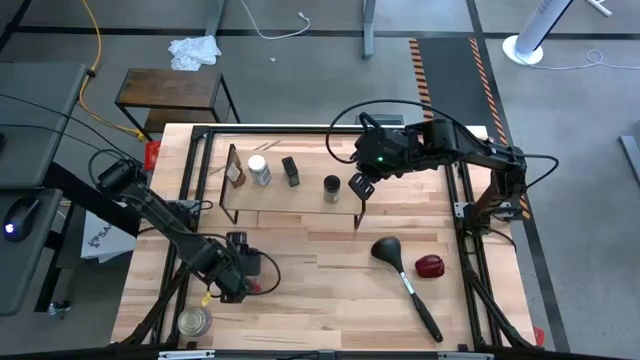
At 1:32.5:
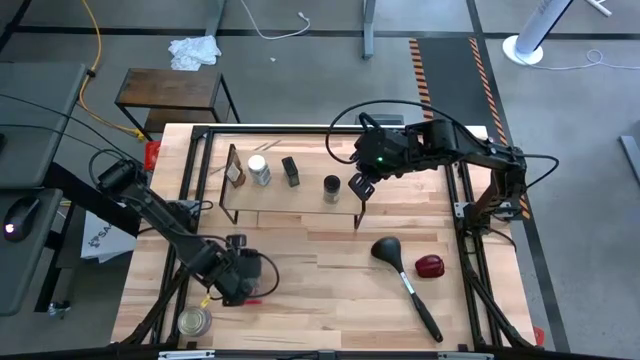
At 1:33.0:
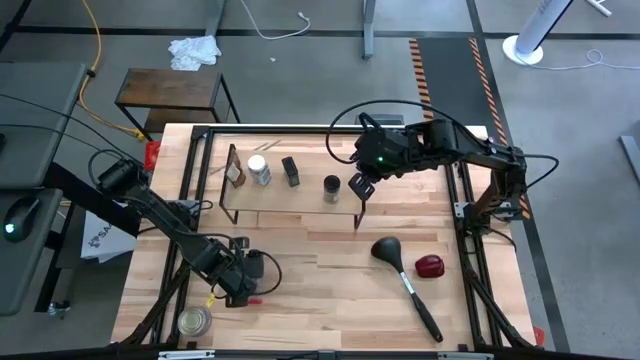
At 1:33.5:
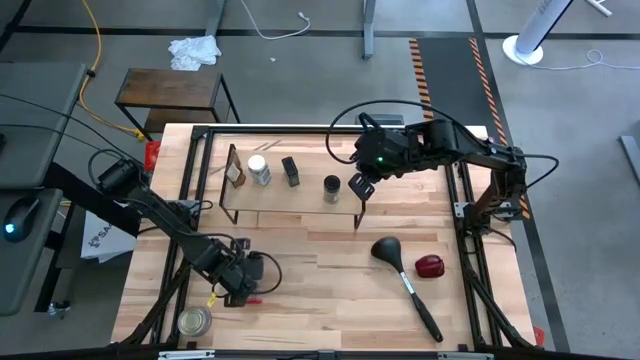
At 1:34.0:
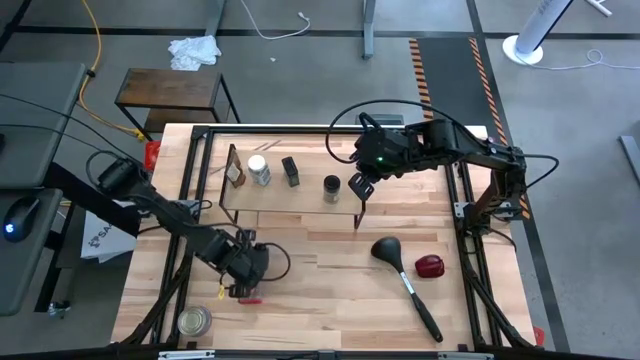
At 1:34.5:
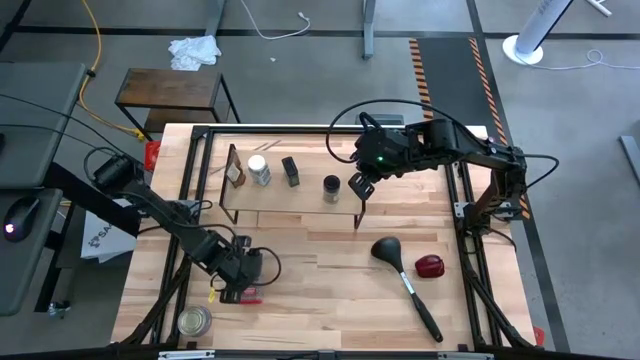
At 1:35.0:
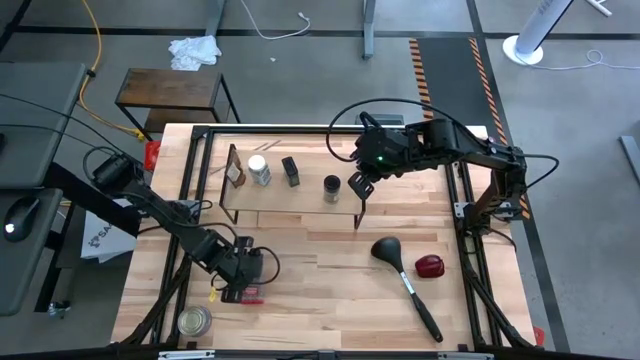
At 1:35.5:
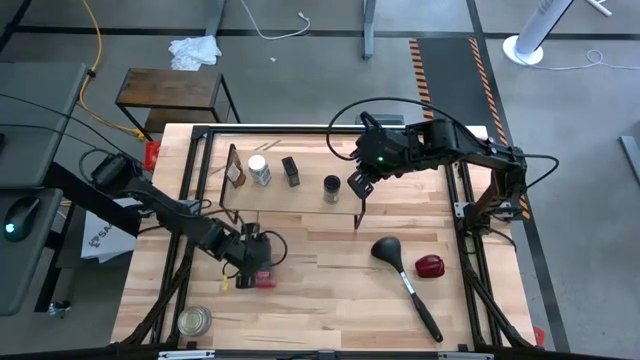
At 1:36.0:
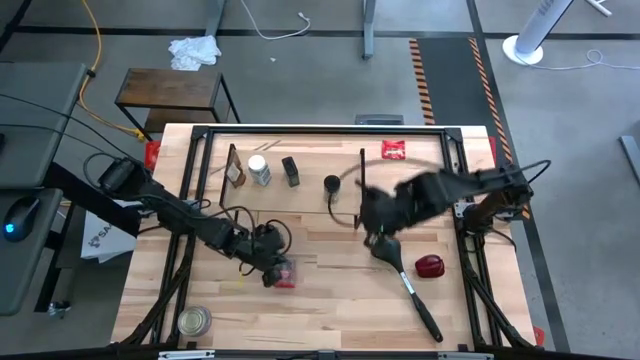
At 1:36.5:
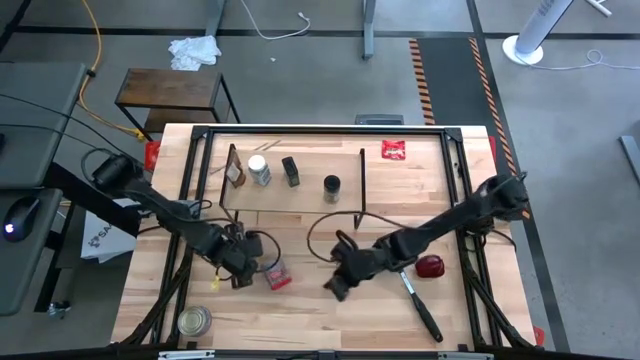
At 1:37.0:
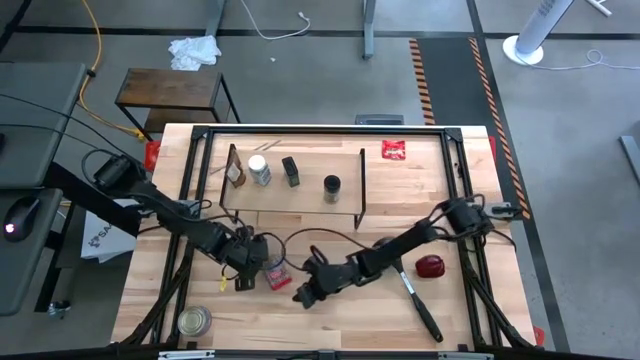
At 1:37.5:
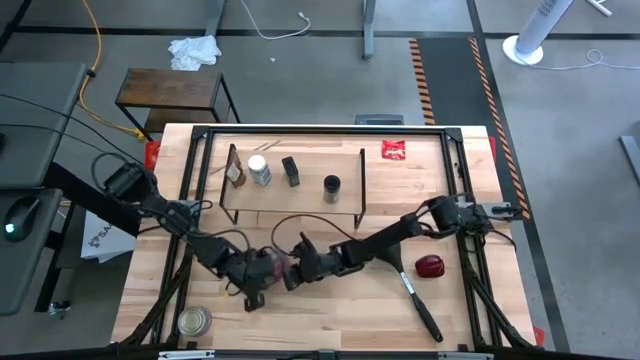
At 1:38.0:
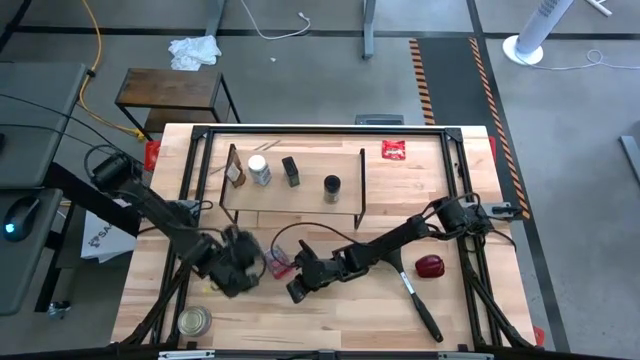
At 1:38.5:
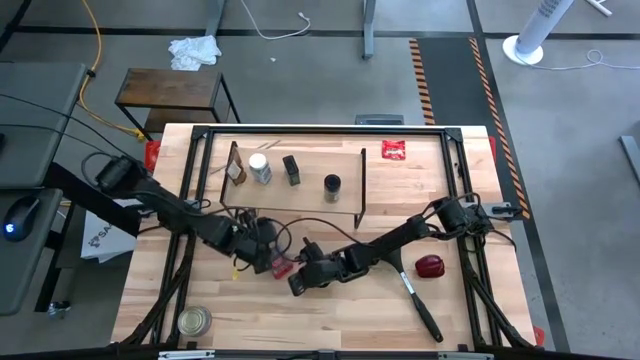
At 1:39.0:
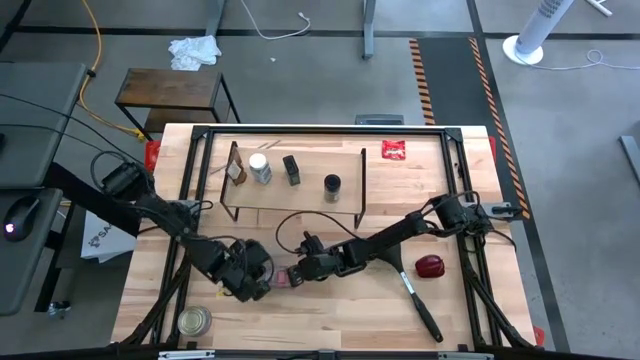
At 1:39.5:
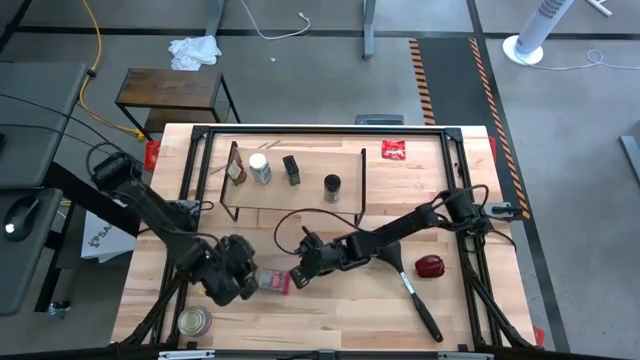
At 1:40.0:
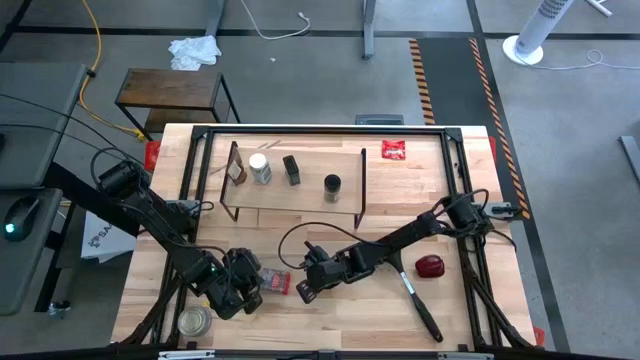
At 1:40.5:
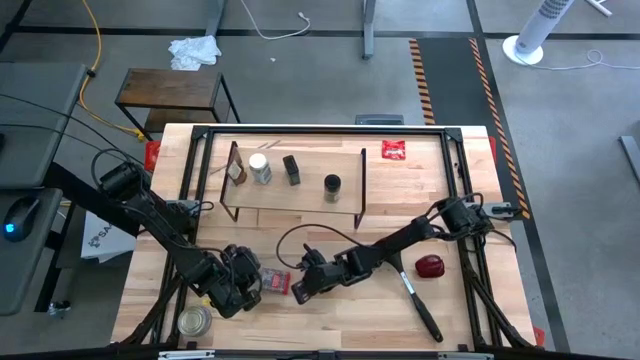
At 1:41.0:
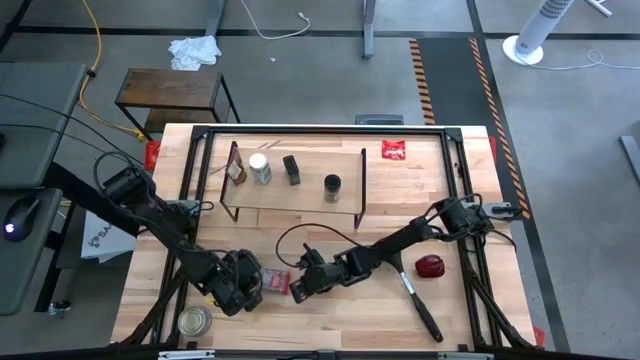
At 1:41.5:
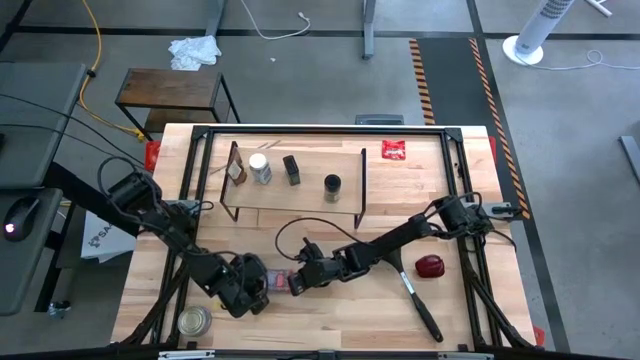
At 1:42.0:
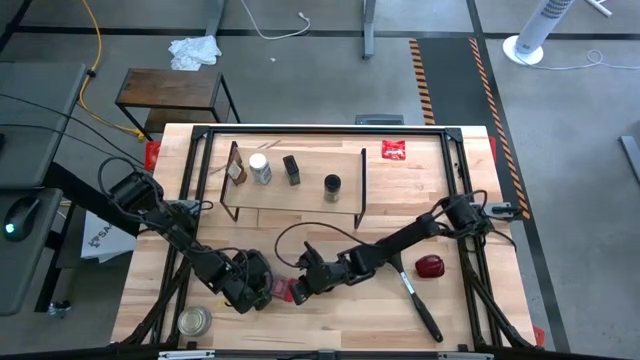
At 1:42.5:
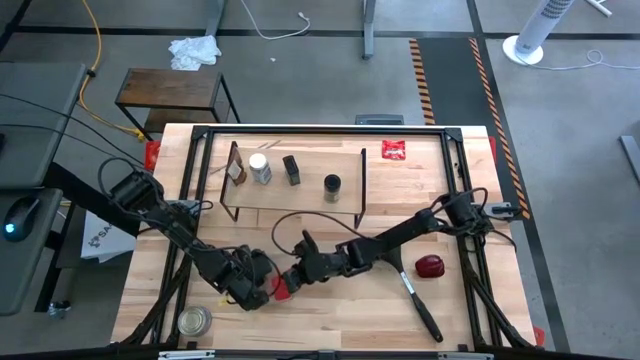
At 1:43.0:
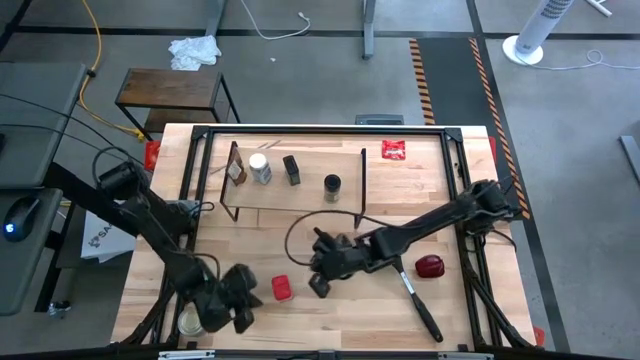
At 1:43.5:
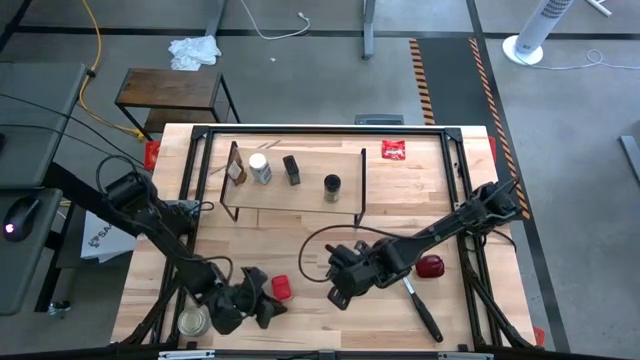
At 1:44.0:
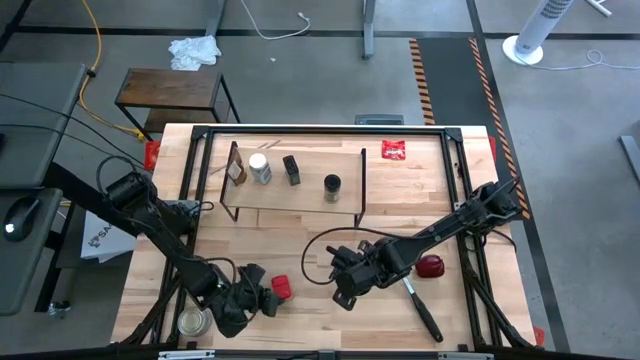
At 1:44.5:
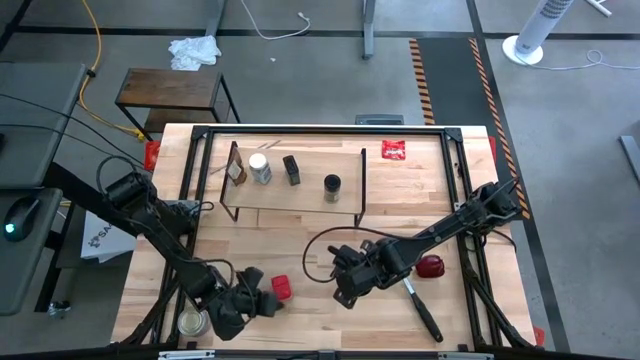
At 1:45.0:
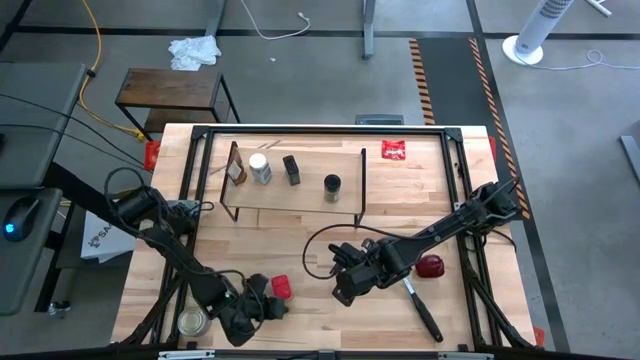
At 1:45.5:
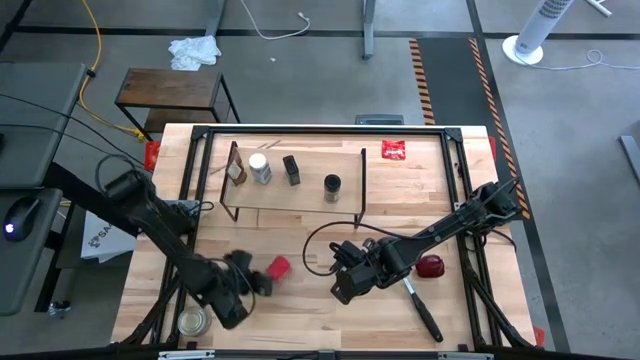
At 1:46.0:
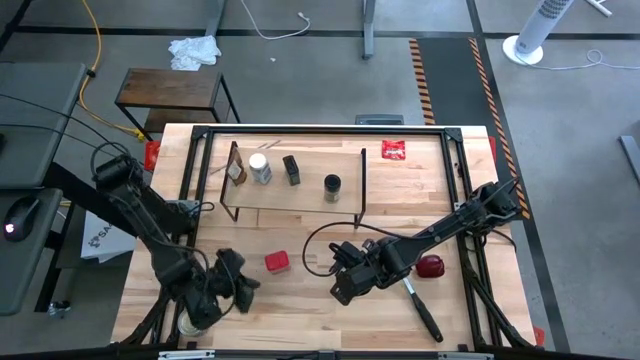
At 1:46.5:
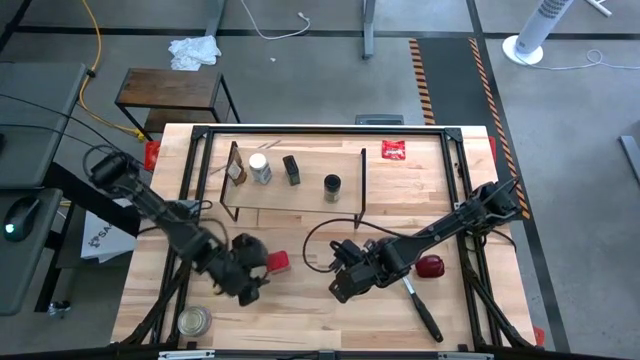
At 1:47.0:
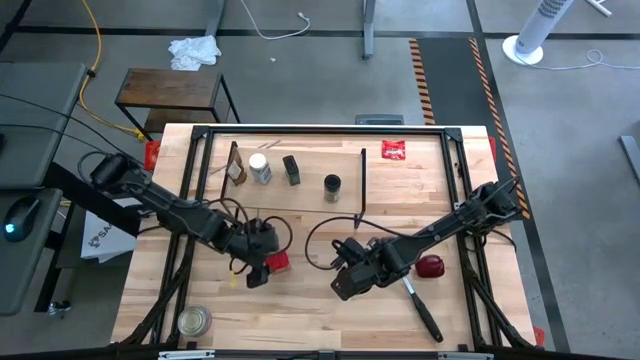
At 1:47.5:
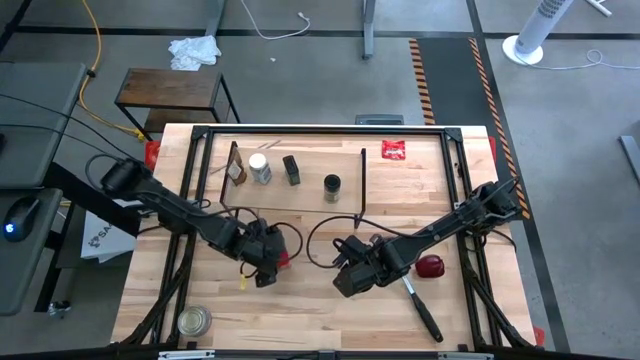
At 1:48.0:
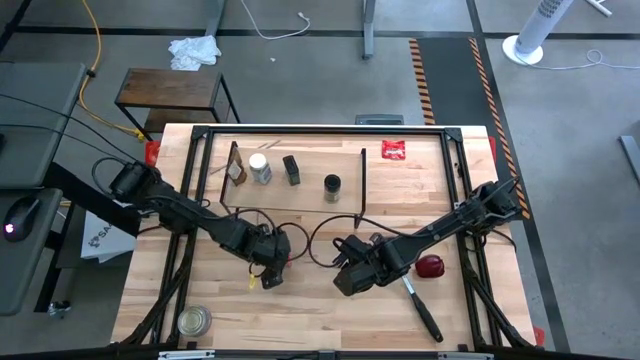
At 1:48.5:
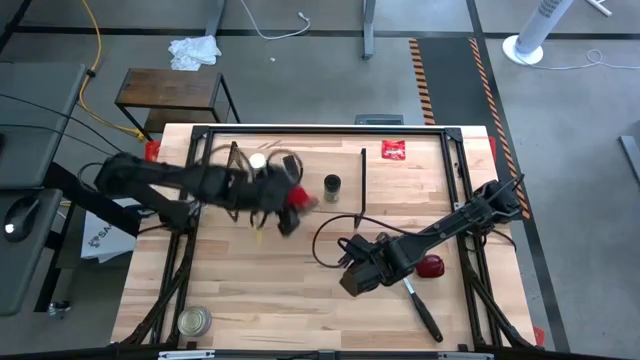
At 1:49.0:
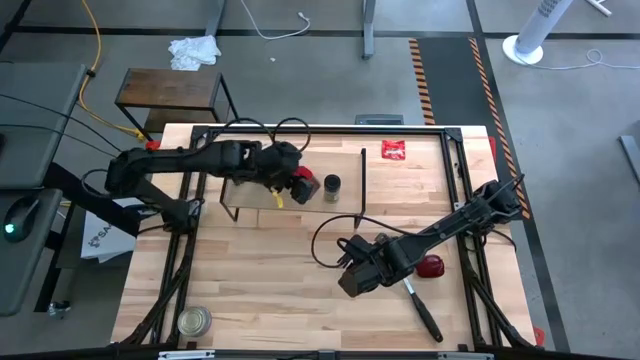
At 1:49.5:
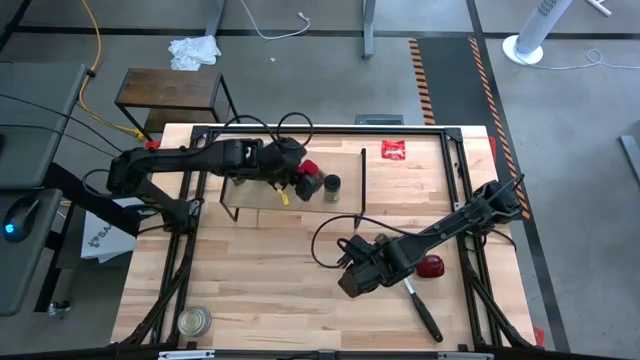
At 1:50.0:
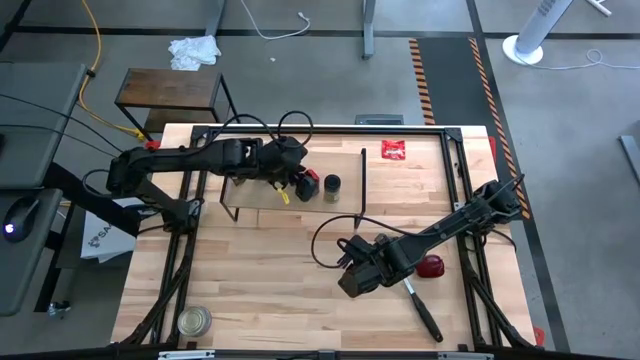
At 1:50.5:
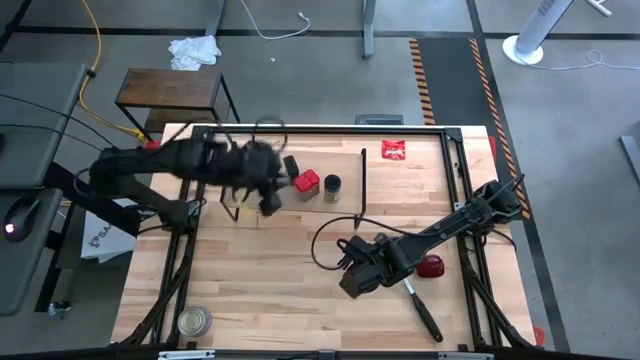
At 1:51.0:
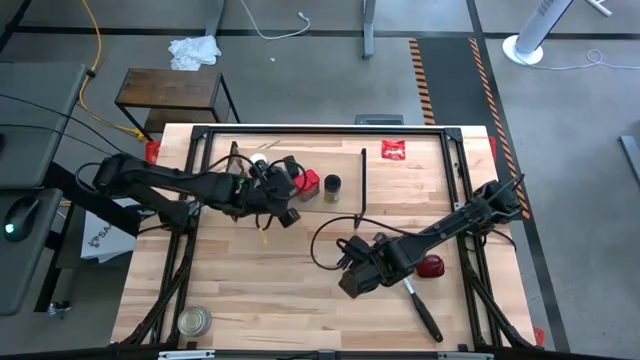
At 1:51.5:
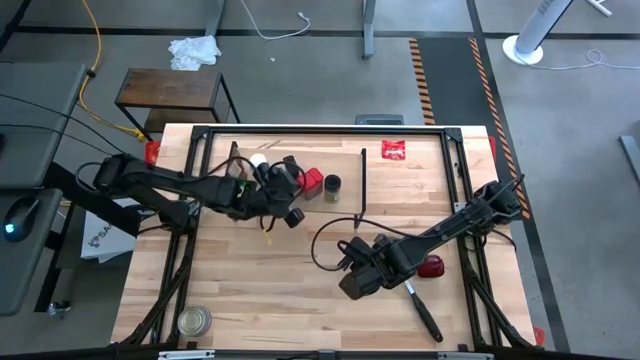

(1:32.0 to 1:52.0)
Task: Shelf spices
Put the red seasoning can on the shelf

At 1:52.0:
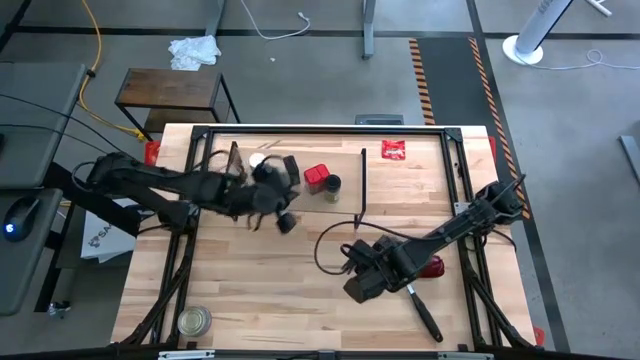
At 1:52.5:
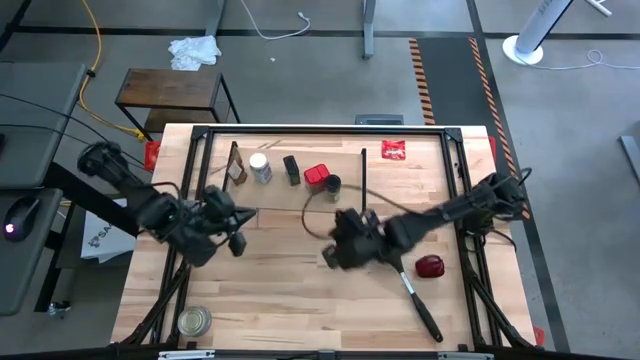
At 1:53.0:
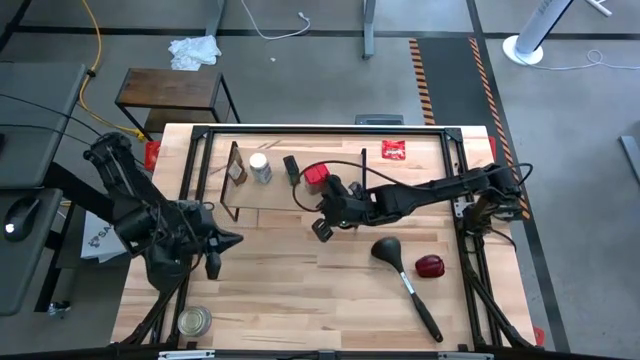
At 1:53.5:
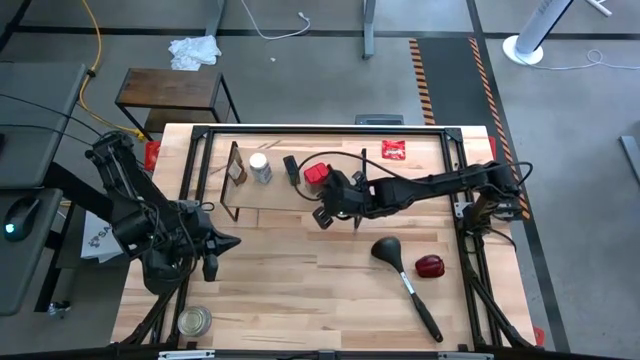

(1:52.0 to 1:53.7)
Adjust the black seasoning bottle
